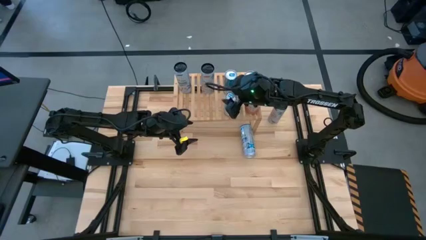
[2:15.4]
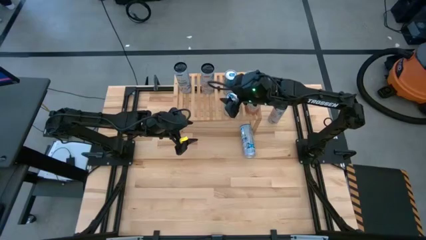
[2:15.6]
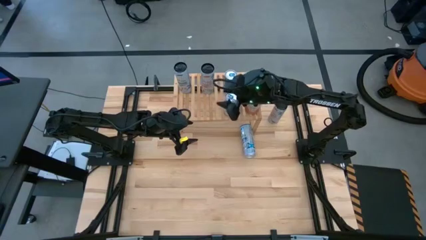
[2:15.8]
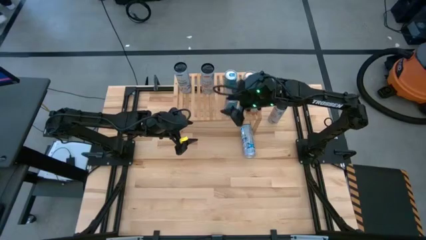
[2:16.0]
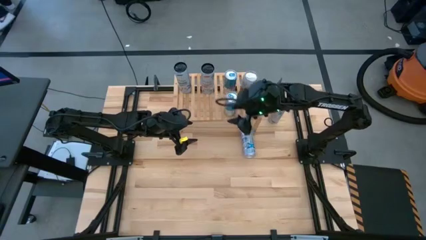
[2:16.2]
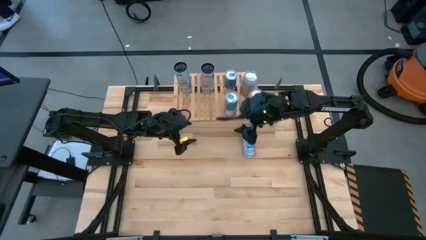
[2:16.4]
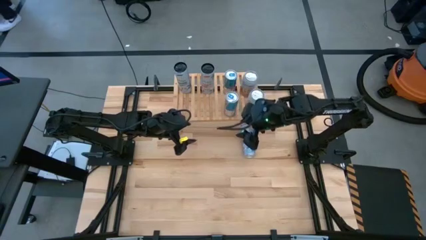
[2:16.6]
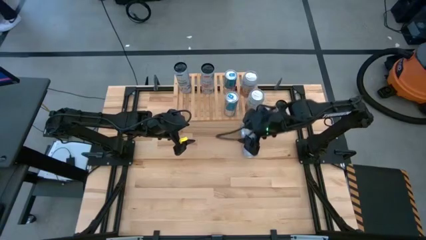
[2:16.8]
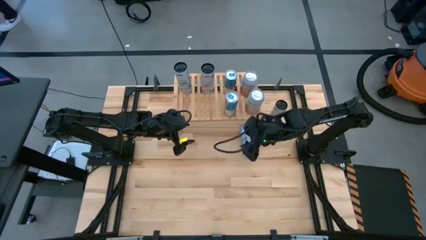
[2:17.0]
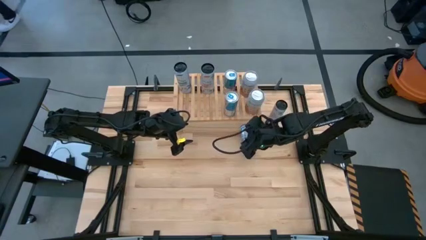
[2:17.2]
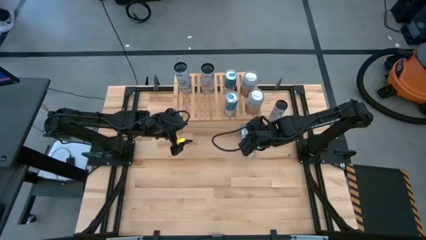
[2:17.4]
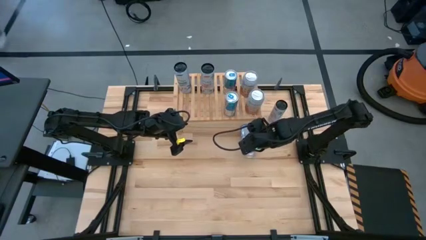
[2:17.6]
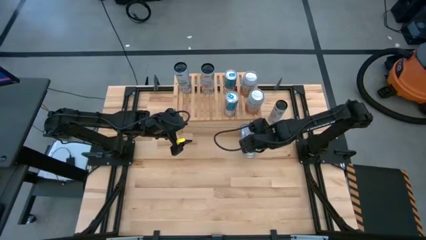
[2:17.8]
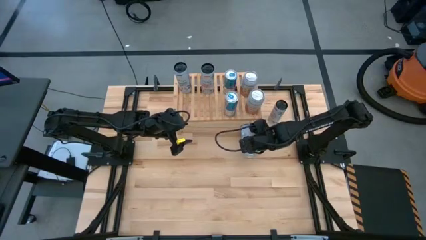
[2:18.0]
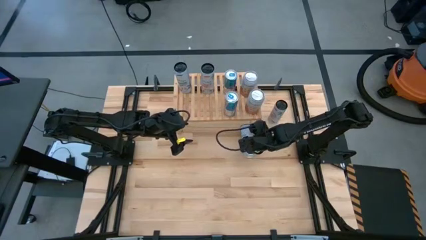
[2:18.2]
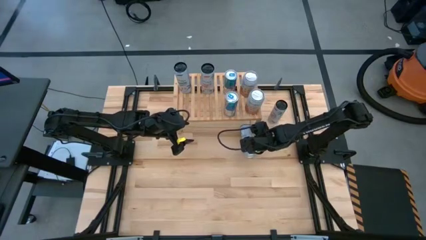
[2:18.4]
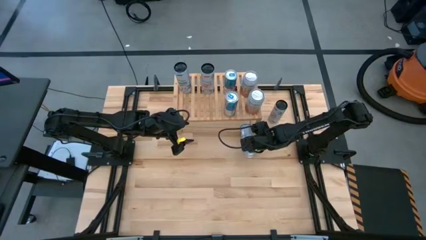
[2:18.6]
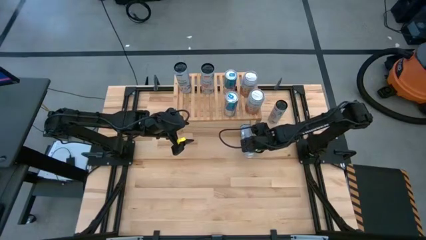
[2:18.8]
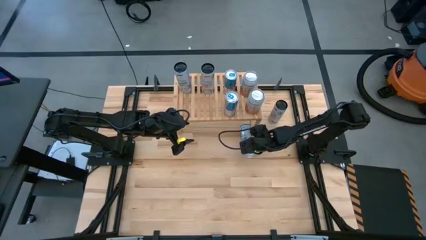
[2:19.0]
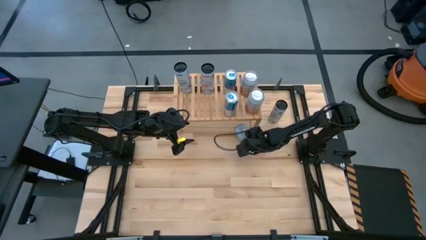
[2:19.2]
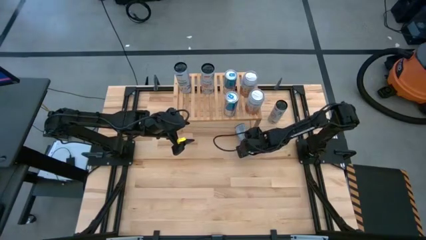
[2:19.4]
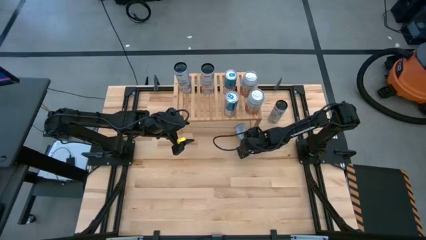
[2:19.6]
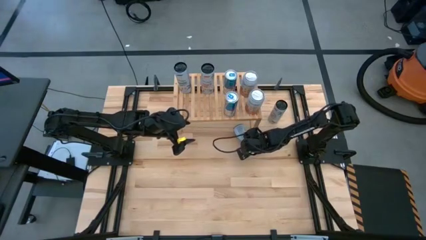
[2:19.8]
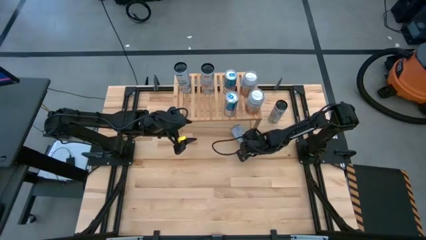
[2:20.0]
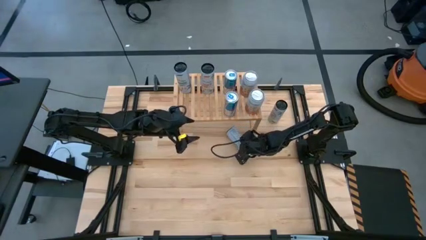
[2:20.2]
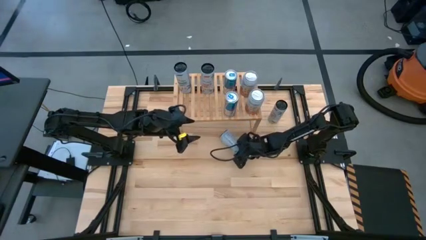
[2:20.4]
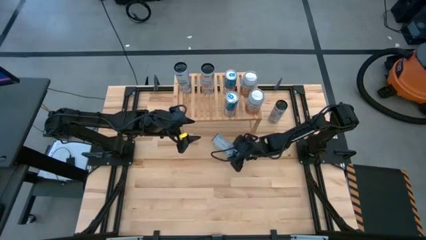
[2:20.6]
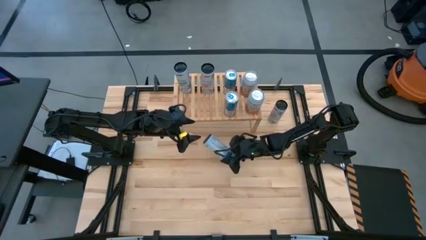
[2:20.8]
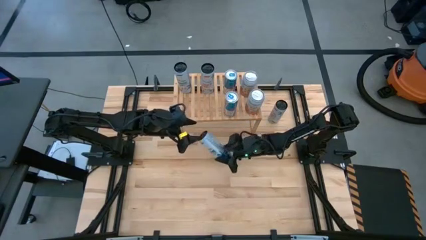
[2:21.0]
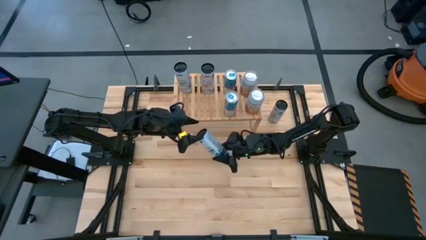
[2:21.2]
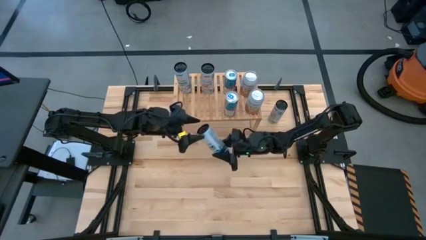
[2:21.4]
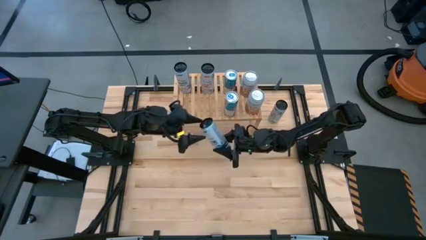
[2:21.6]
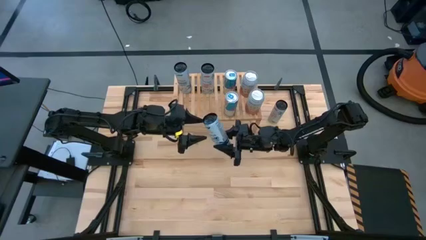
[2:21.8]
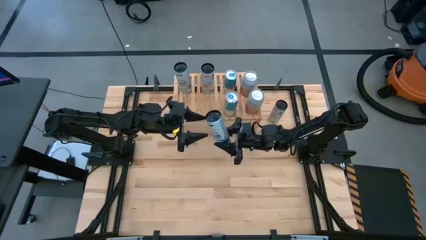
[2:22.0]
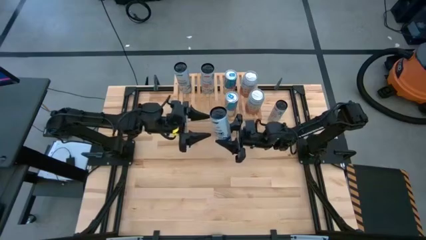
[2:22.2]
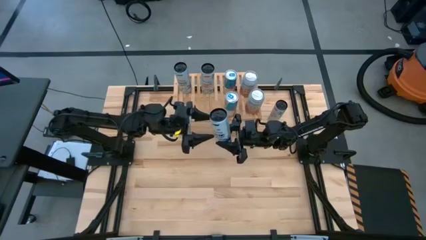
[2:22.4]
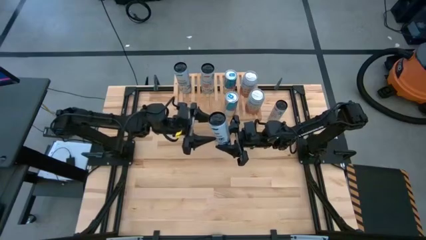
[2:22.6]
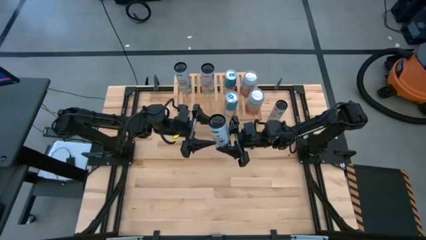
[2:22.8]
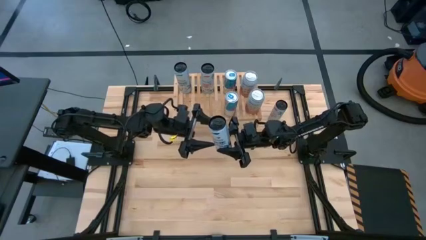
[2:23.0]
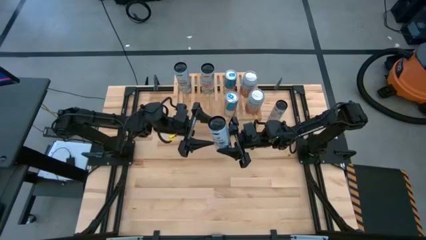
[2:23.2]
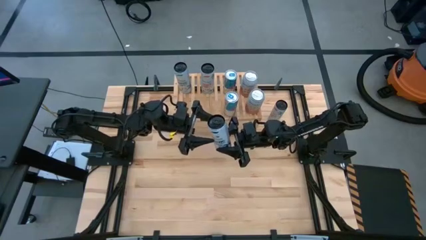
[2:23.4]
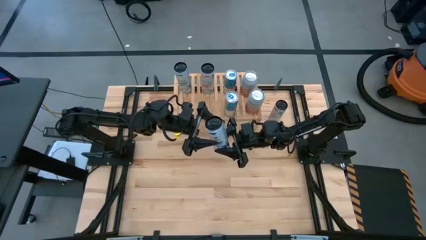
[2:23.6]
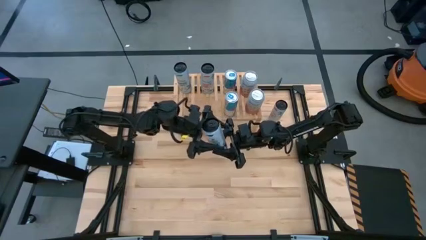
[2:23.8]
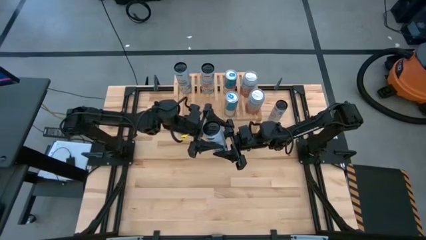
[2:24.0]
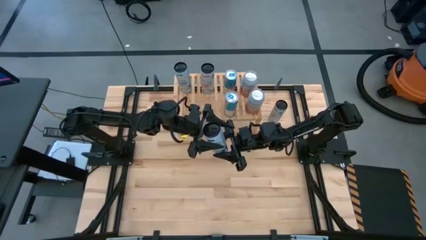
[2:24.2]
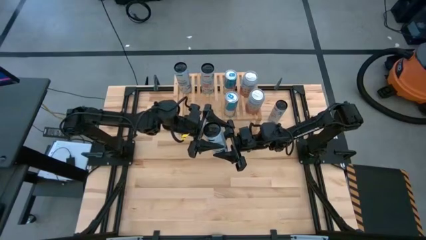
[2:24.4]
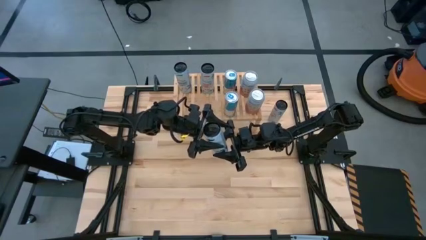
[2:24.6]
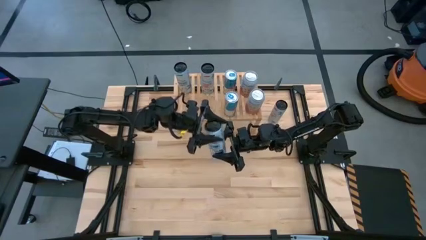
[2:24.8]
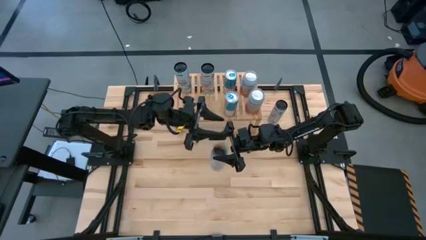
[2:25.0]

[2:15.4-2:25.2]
Task: Place canned beverage on shelf
Put the white-blue soda can on the shelf aligned with the other white-blue soda

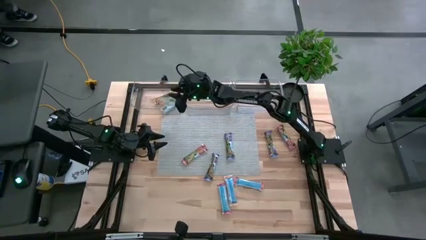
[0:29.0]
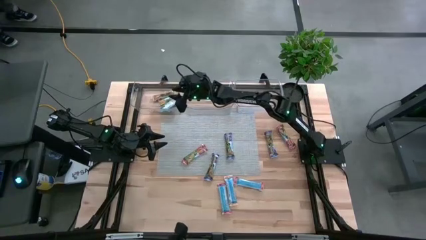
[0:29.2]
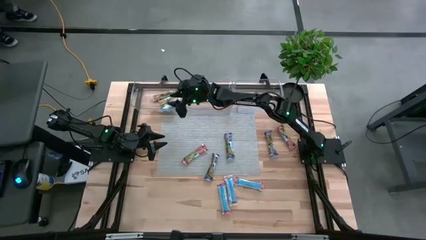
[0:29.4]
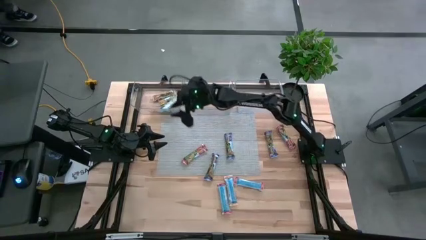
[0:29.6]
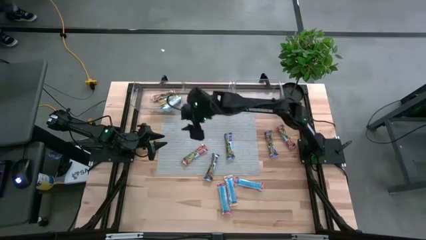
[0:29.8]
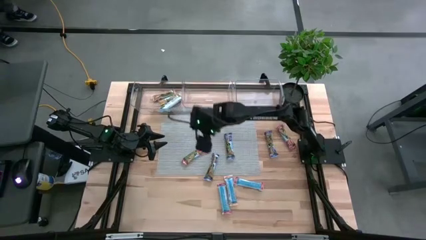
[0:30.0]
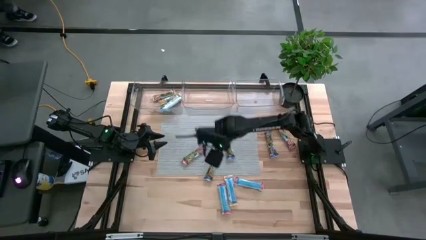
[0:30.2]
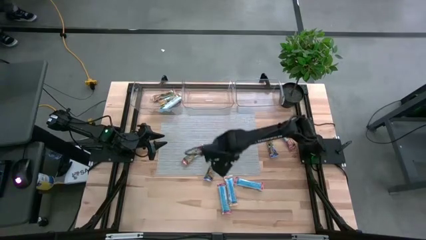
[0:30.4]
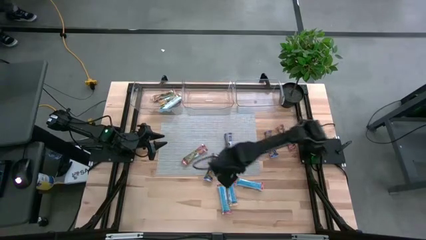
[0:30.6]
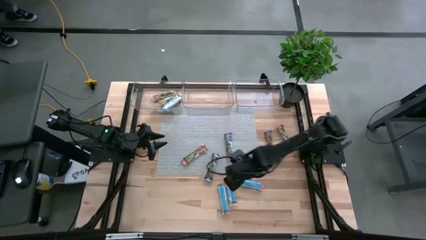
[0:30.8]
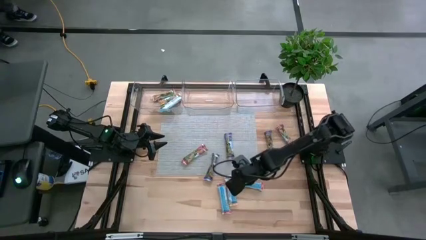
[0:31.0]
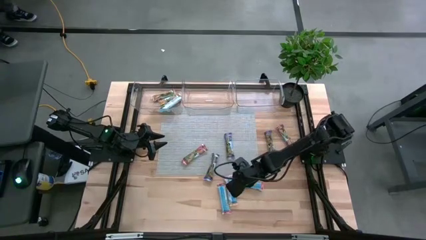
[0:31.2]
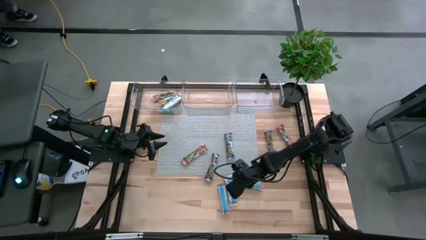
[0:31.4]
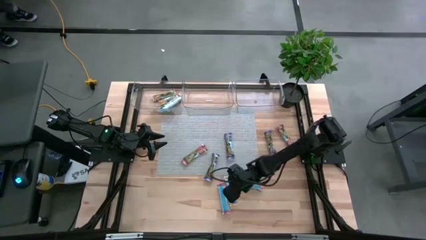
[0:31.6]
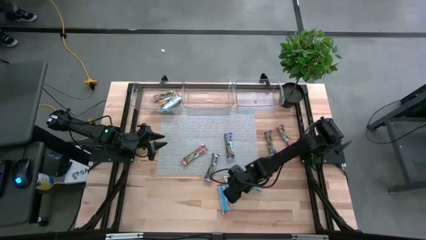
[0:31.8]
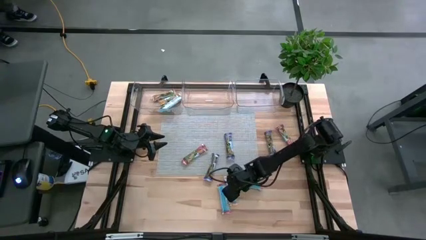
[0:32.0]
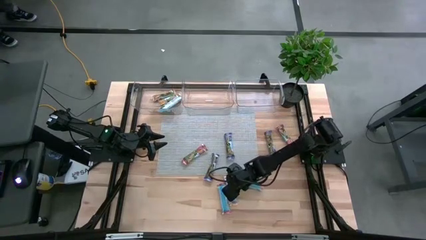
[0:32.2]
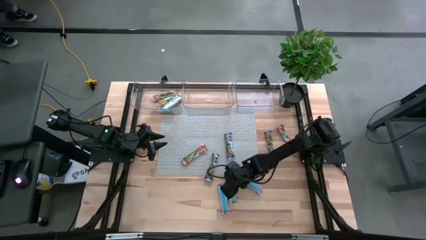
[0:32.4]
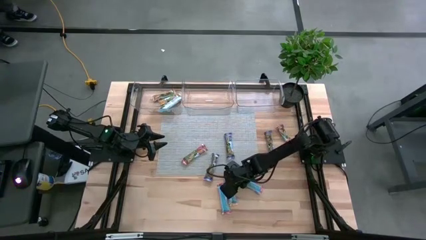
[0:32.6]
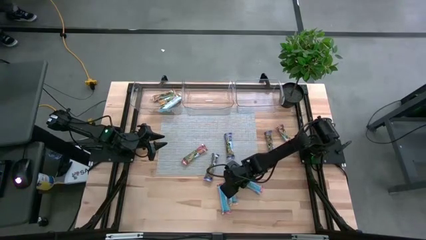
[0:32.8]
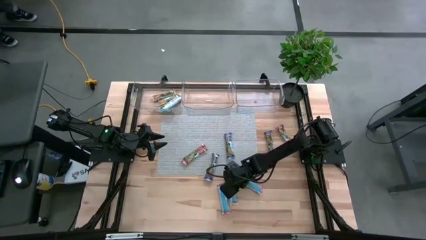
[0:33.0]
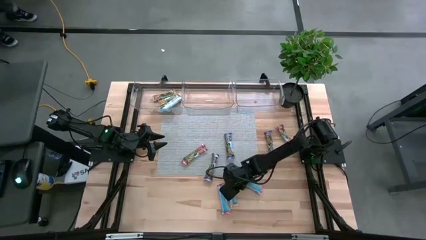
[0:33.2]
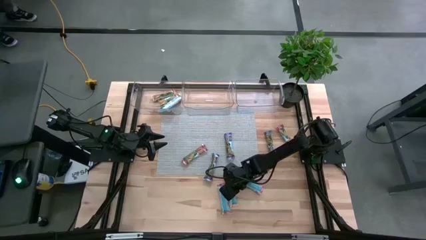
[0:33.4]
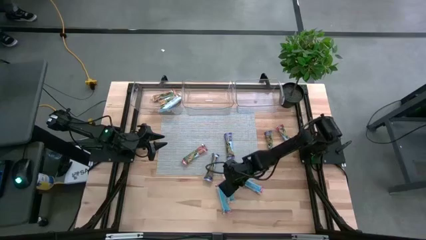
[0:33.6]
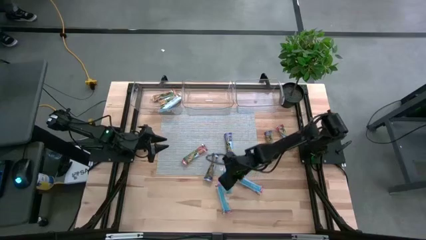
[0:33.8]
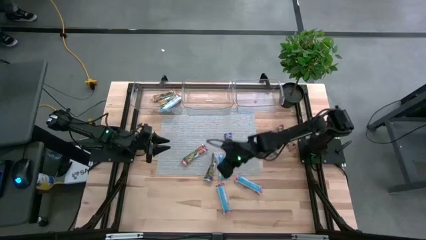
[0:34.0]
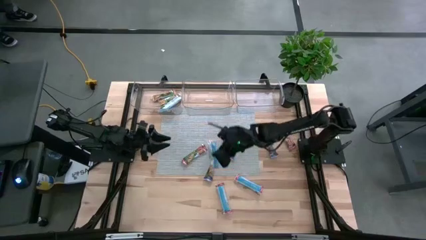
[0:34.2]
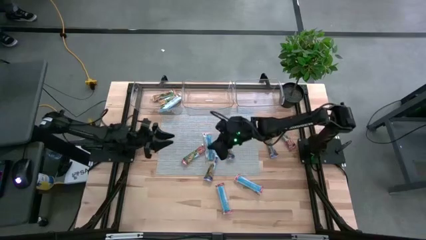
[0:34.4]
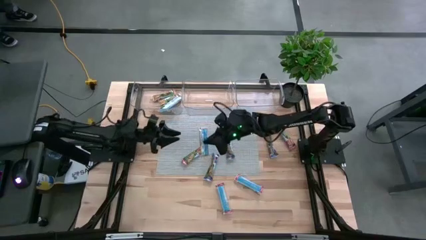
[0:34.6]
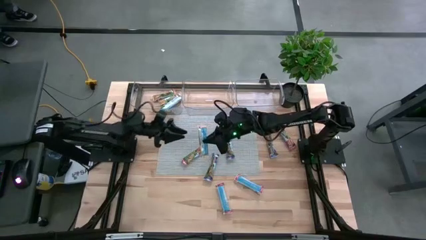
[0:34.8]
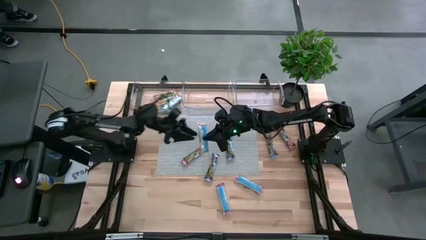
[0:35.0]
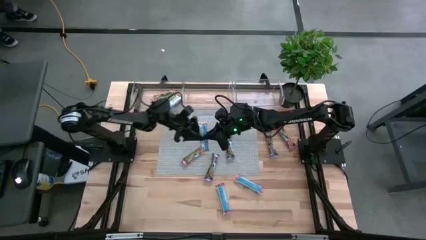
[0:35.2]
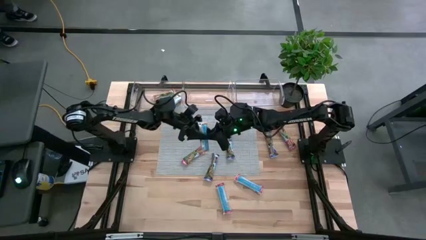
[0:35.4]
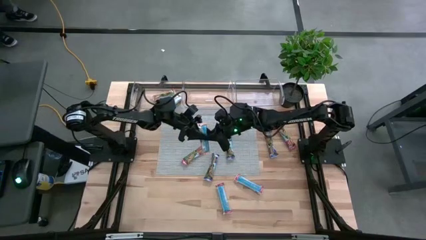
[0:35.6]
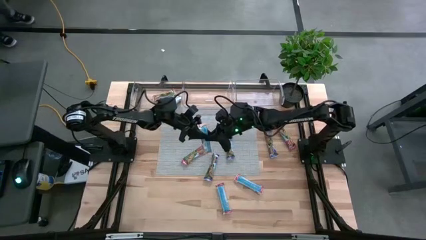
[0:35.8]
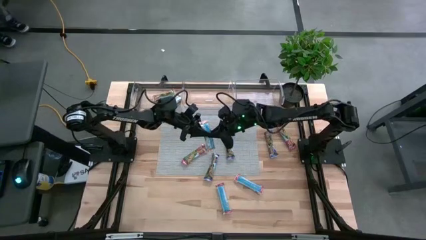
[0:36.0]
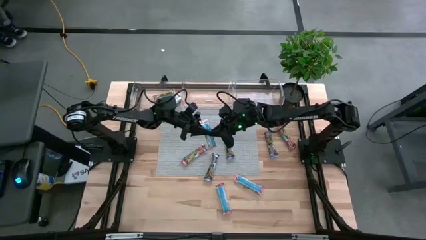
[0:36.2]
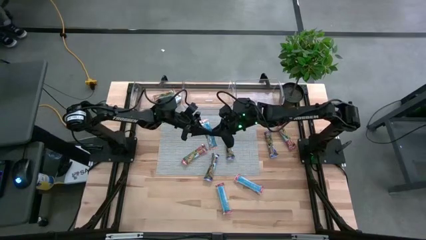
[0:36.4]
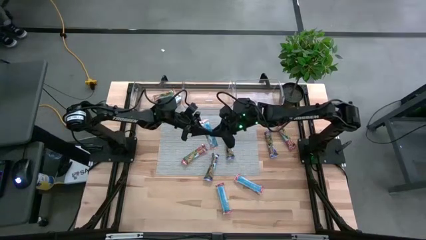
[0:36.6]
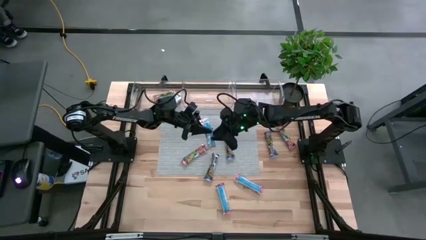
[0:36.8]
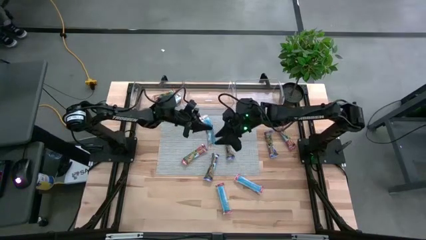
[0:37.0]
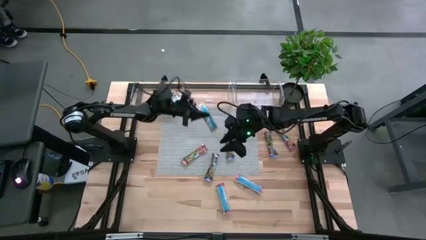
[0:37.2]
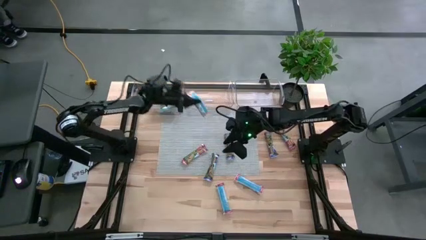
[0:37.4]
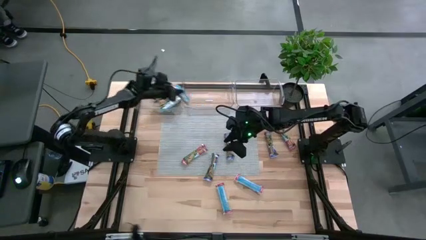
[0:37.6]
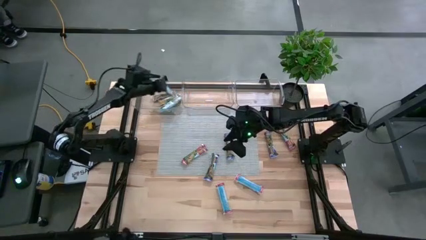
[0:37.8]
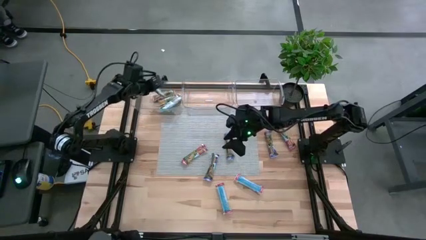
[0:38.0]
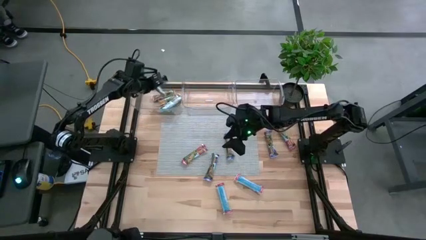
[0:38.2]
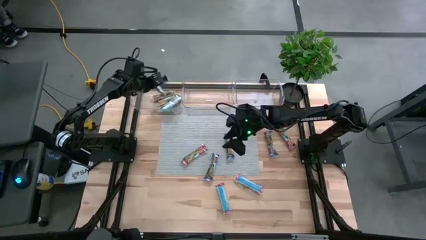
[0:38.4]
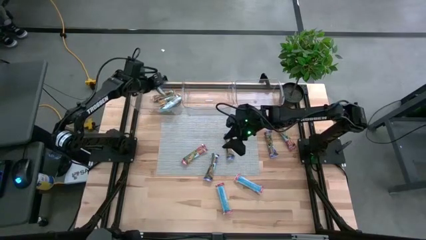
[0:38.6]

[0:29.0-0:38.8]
Task: Pick and place Granola Bars by type
Put the yellow granola bar into the left transparent bin
